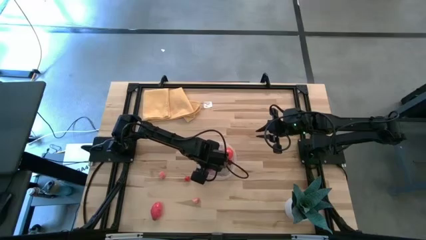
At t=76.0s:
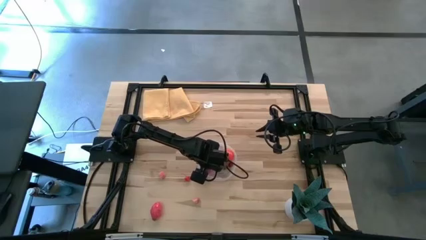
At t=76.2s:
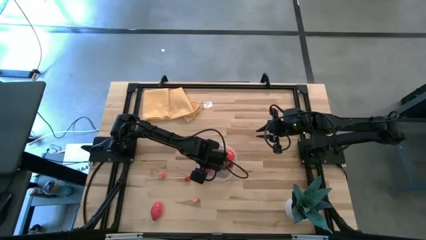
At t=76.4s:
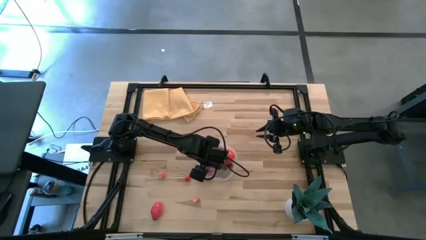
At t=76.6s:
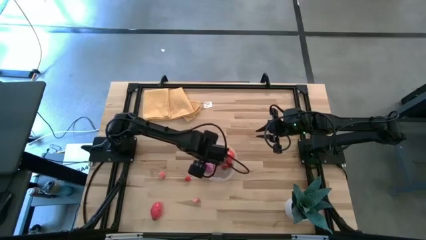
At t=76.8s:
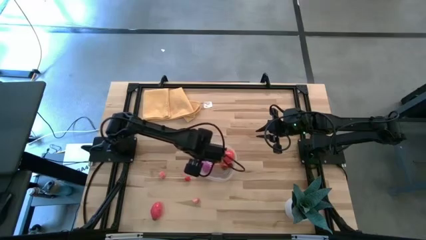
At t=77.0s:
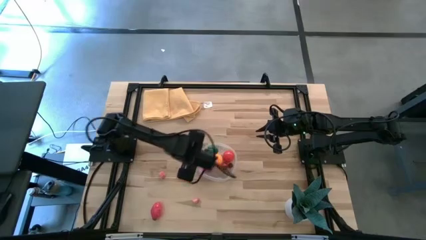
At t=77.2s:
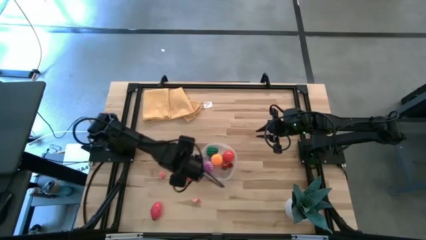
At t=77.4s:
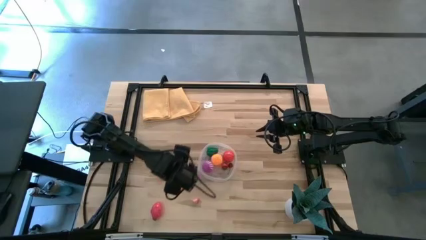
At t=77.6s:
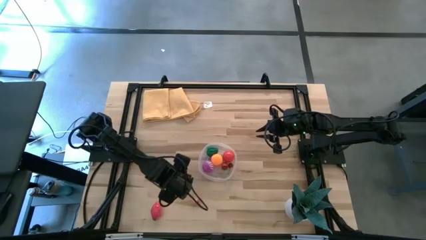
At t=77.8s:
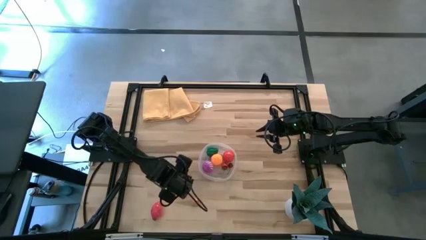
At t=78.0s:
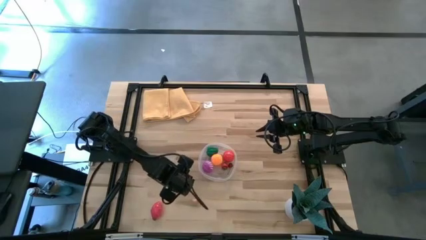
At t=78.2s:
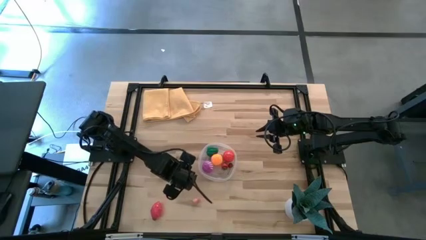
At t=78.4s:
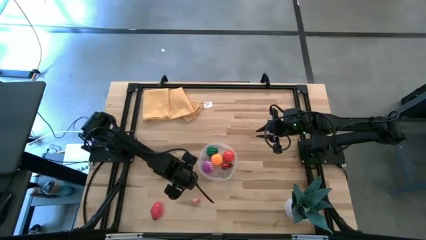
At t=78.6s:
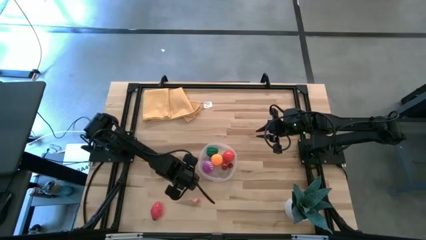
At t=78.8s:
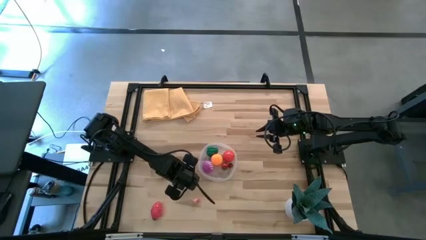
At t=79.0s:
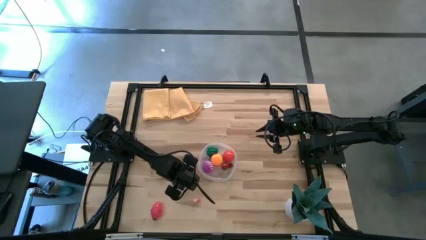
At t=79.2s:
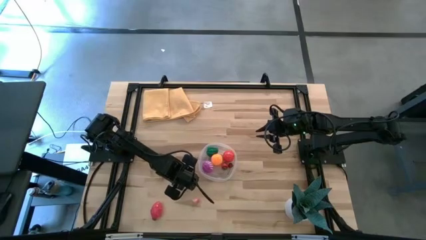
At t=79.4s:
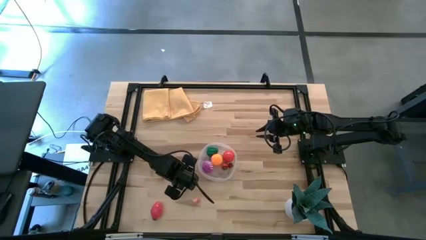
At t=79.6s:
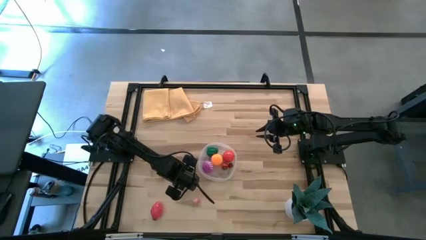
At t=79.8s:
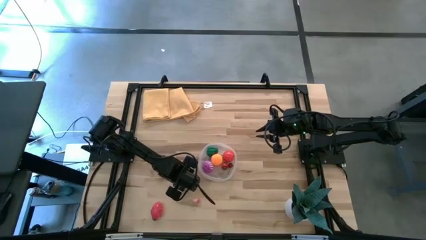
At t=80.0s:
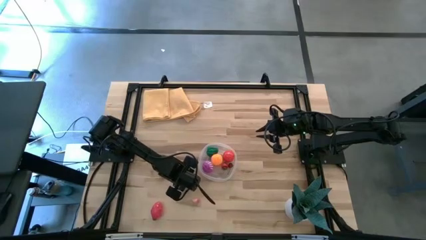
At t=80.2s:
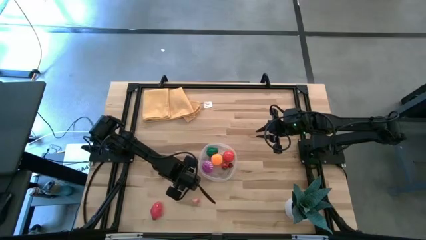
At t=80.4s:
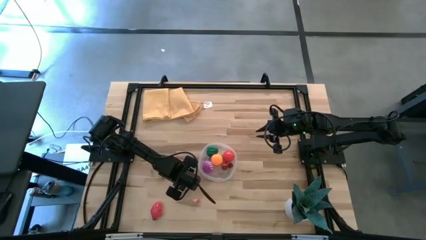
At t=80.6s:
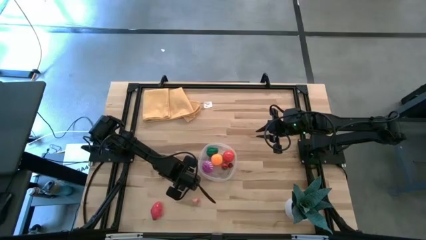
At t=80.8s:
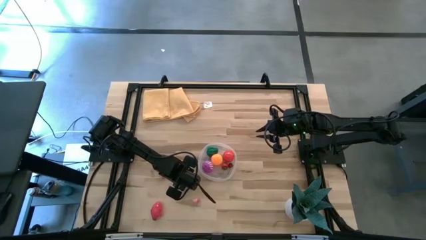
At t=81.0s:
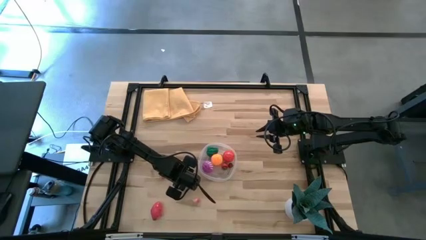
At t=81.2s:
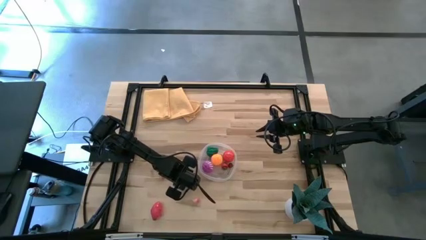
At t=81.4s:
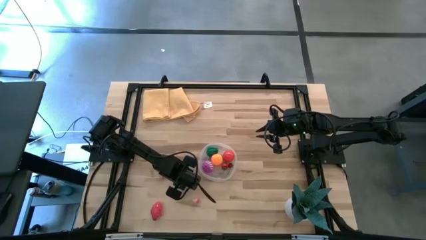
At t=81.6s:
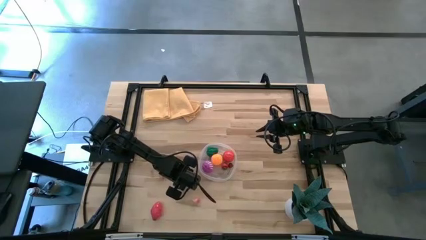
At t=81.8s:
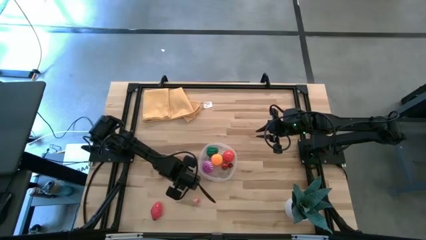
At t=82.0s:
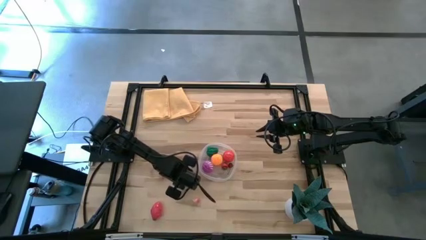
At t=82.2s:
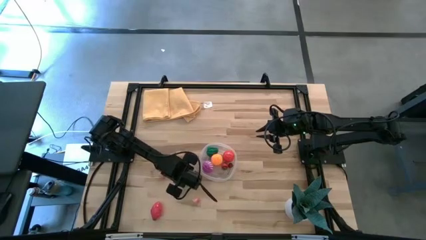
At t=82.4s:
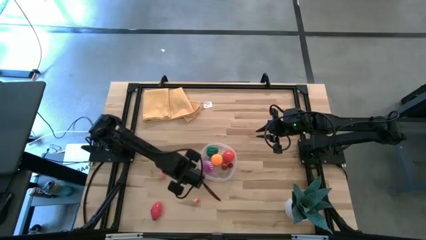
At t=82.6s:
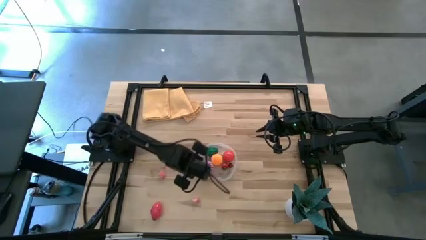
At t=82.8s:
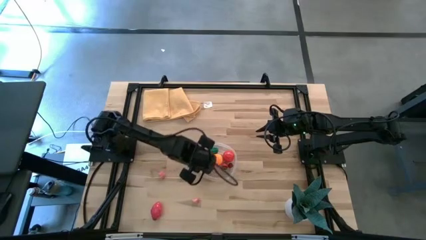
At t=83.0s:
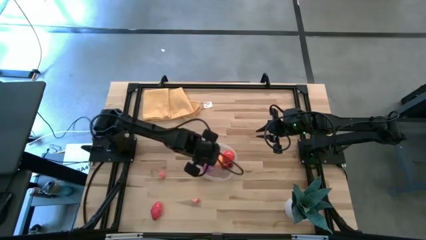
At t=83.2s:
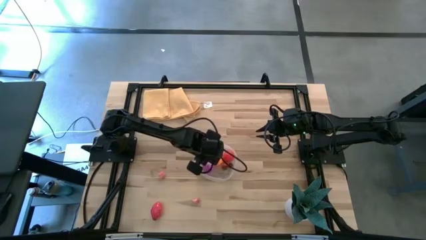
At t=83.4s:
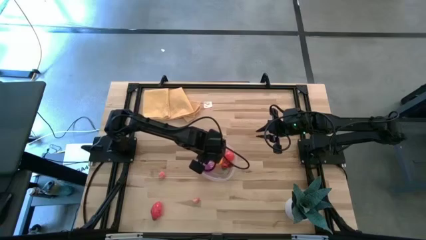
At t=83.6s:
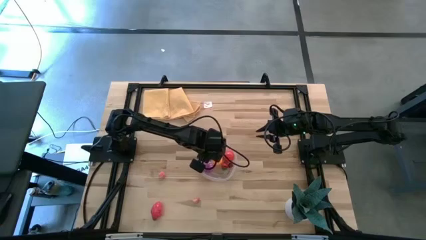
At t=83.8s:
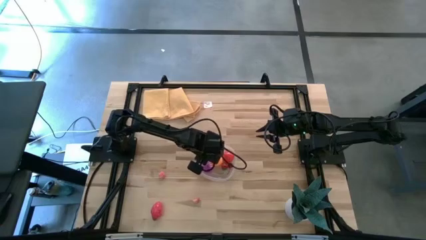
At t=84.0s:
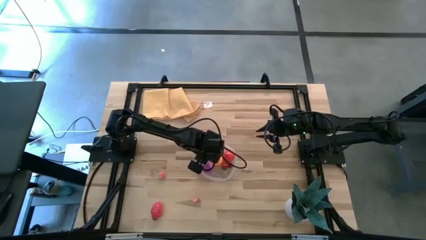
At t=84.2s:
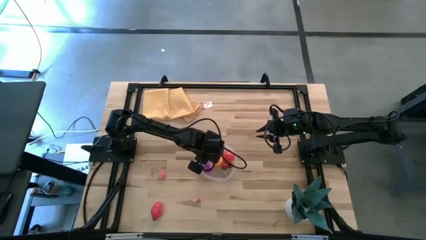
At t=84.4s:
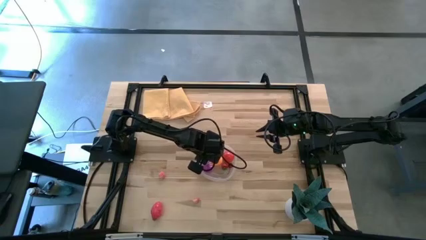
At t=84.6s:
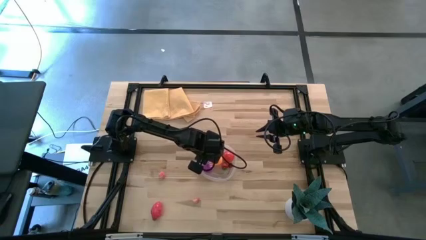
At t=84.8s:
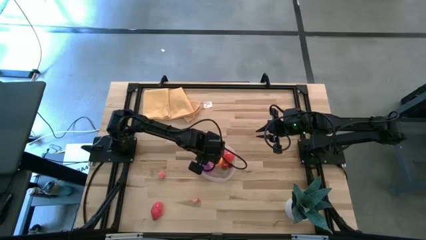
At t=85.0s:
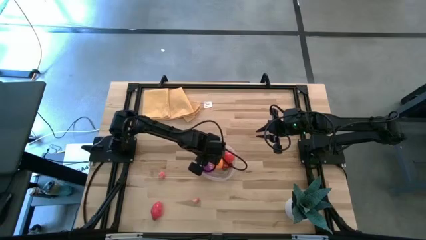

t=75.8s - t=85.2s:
Task: Pick and placing Produce into tupperware
Put the red cherry into the transparent bin

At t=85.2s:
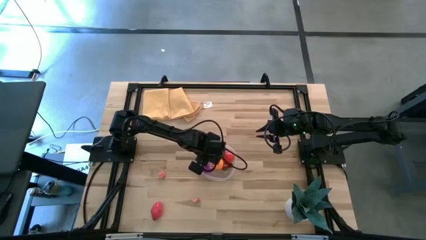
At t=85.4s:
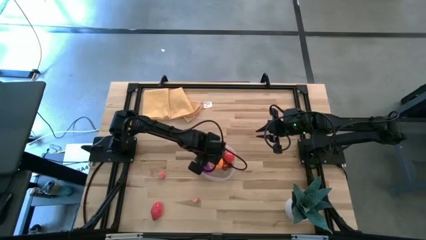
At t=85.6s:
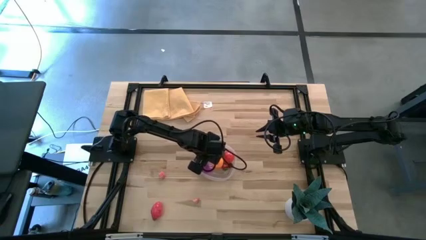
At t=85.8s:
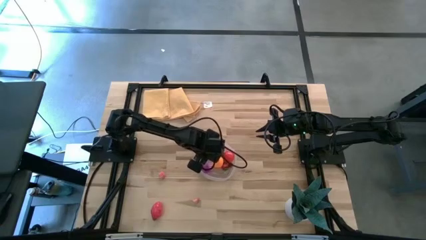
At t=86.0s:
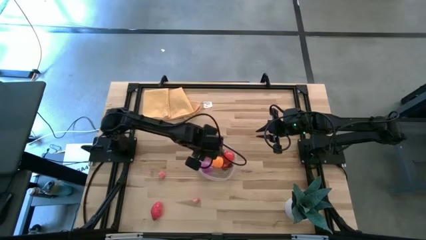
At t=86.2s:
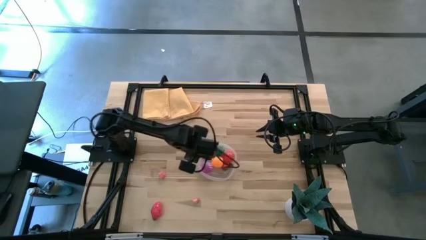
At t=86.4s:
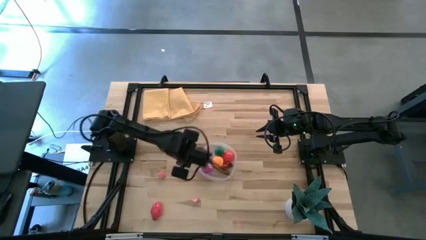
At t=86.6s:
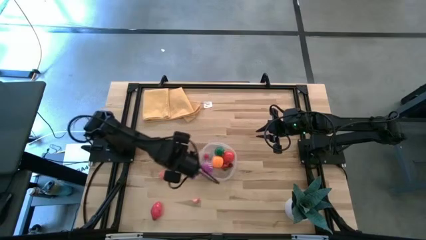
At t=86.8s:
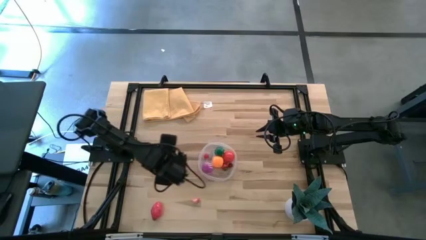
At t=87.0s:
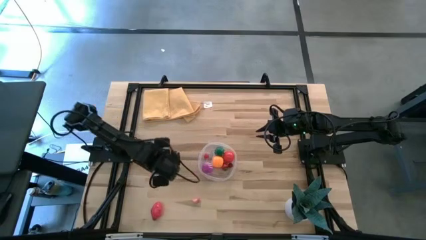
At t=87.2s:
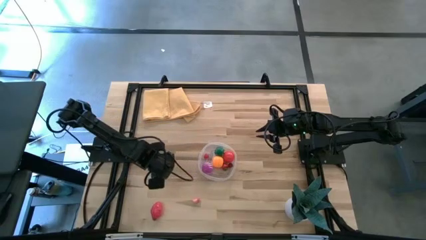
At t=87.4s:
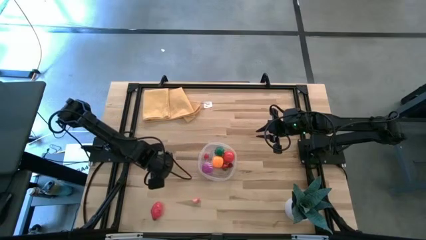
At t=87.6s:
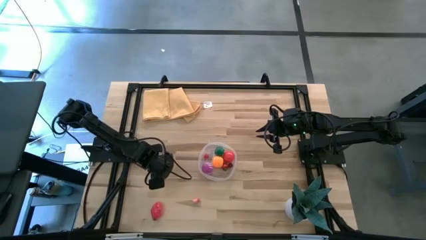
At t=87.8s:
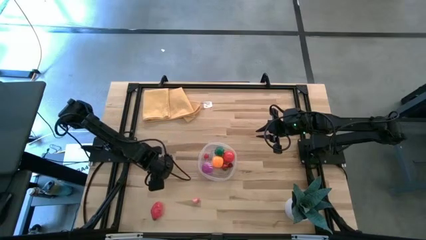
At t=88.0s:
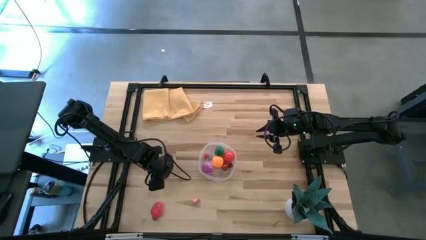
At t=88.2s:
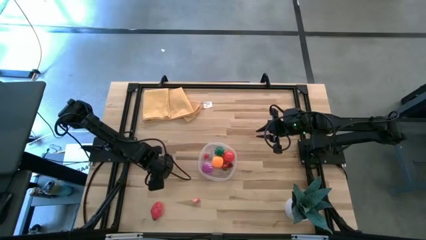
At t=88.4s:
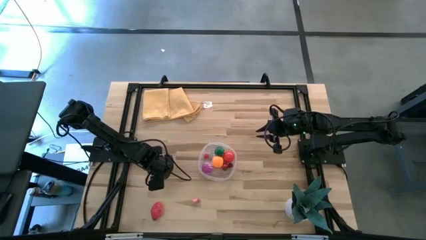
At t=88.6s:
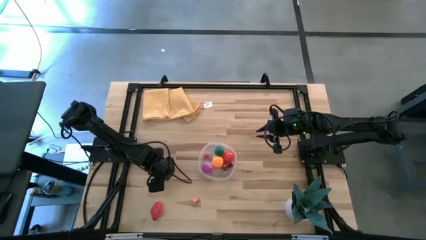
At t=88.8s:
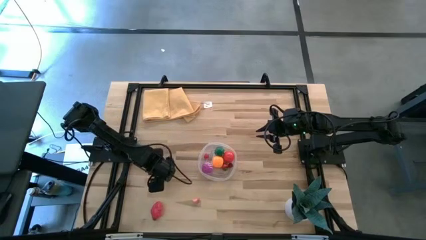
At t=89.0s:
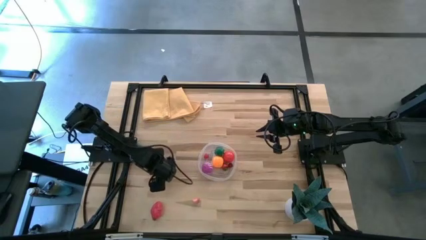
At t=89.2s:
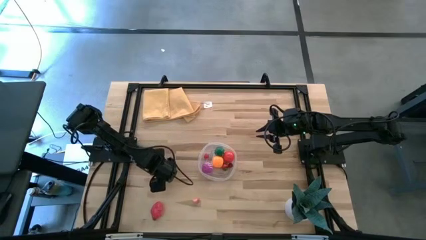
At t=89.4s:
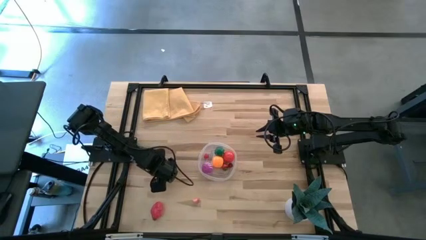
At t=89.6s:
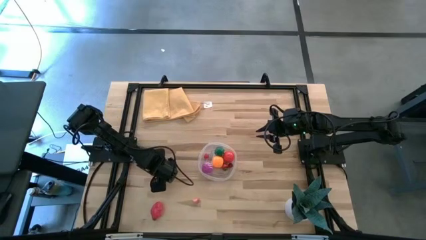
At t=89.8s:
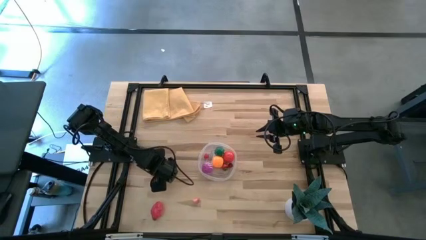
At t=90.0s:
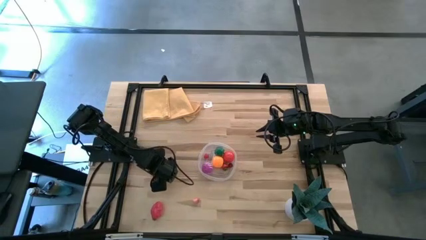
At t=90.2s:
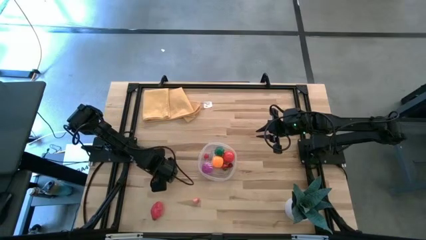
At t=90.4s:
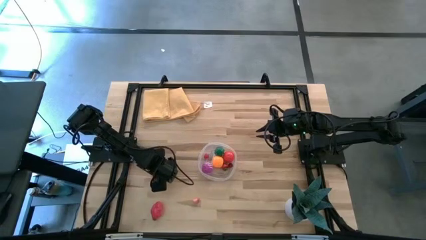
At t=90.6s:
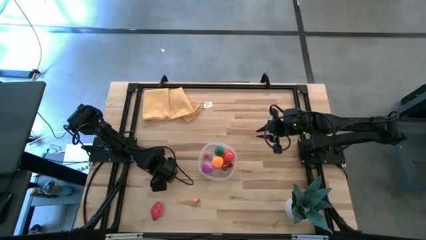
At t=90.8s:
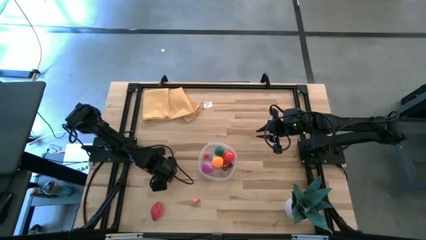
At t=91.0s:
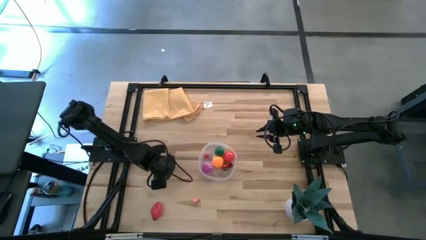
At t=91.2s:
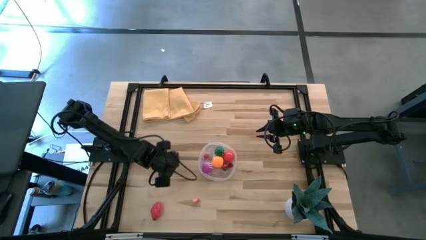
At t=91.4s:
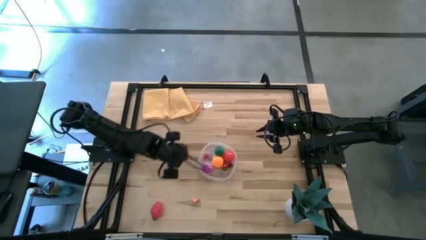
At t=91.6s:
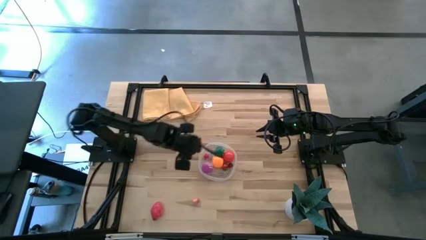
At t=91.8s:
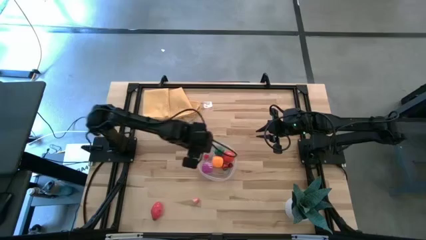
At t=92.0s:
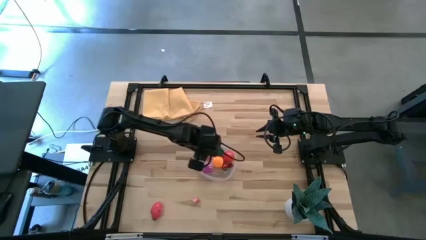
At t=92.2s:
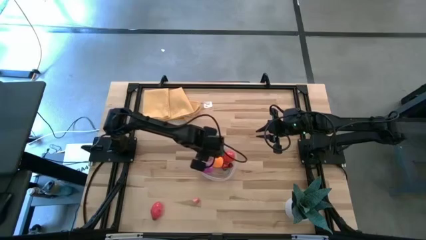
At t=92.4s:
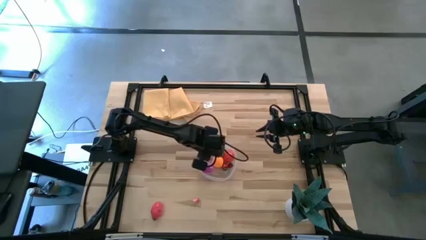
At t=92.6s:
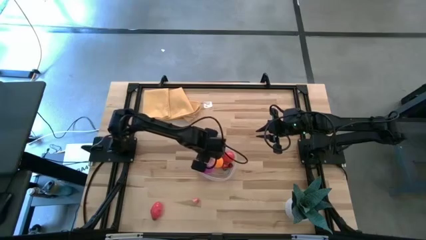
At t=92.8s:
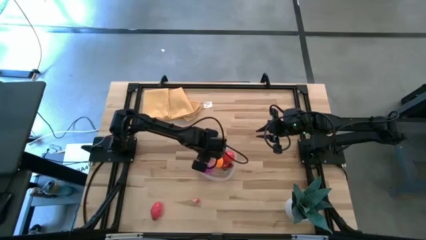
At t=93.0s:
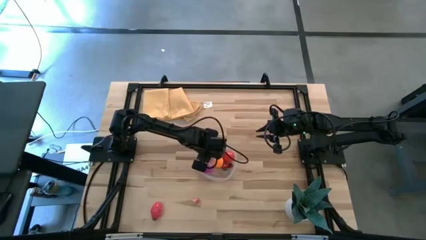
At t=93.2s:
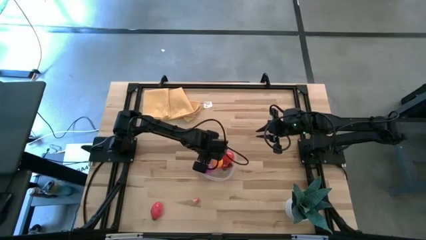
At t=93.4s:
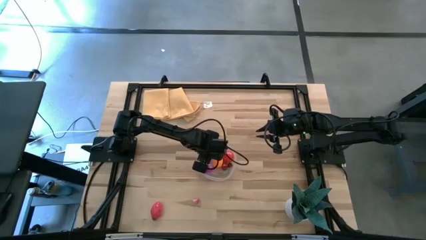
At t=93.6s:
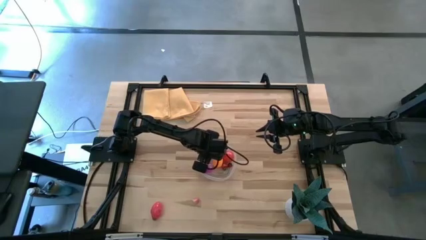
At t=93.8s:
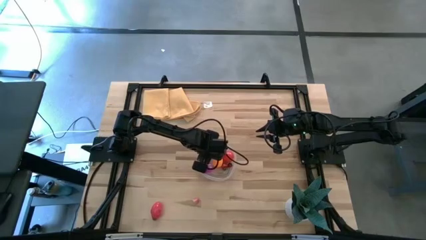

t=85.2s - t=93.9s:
Put the top pink peach into the transparent bin
